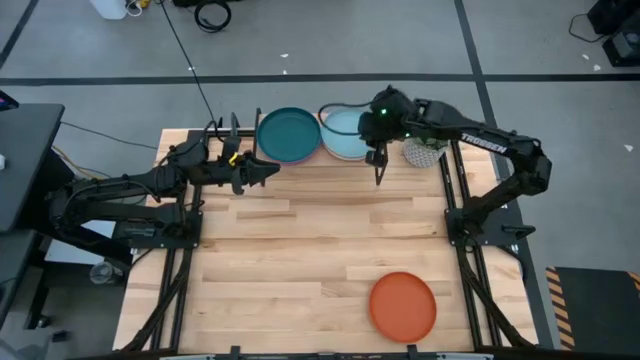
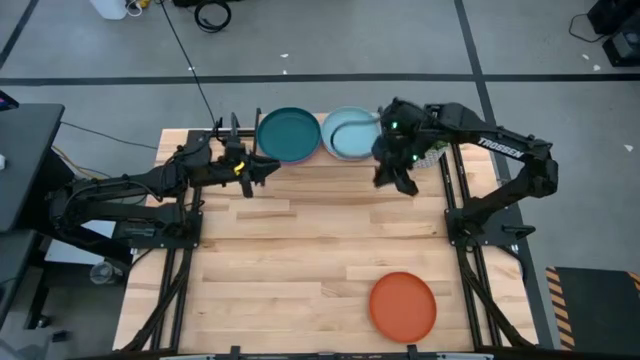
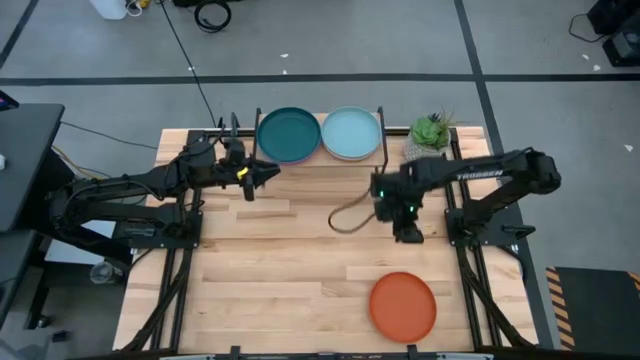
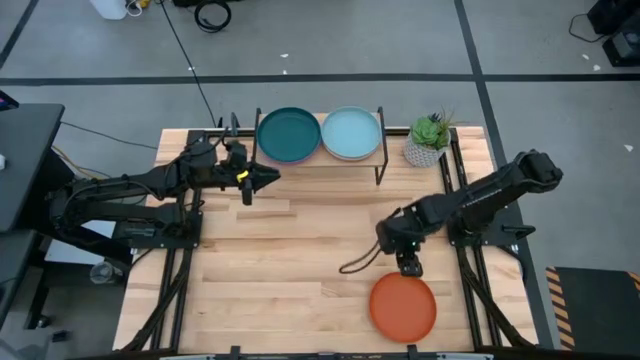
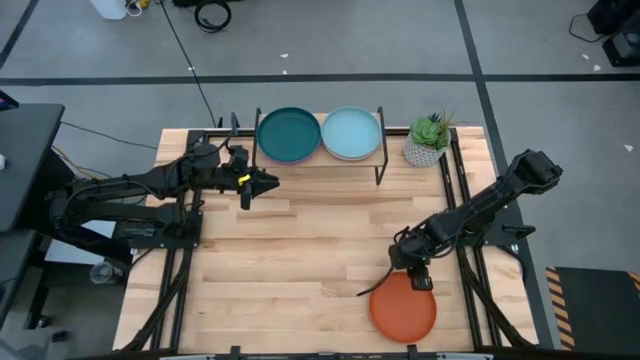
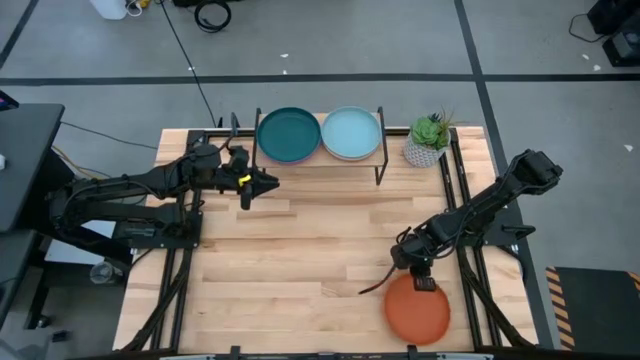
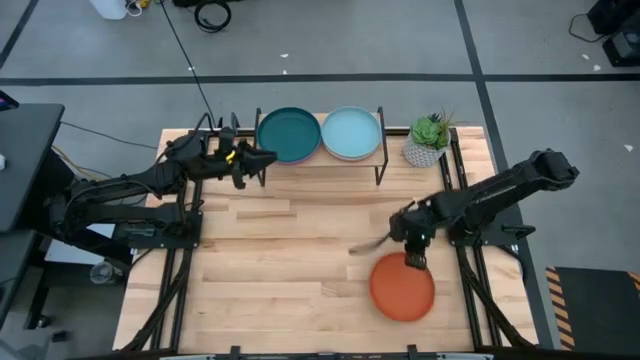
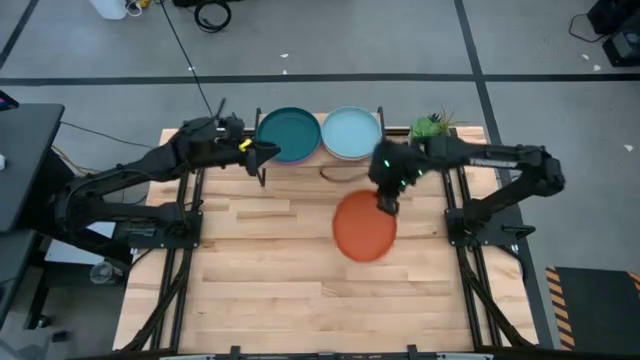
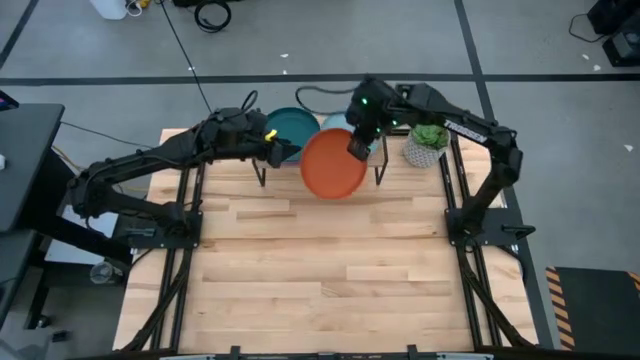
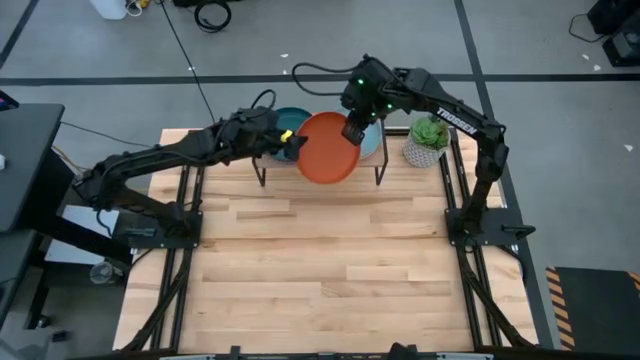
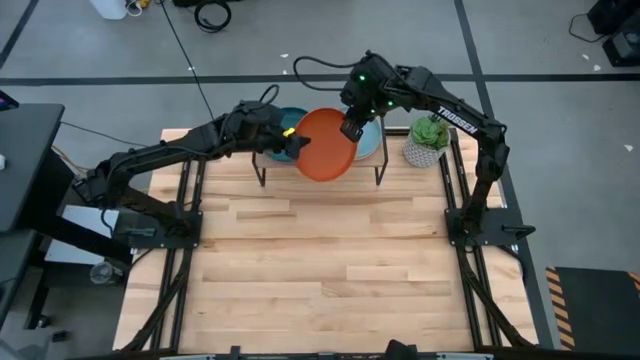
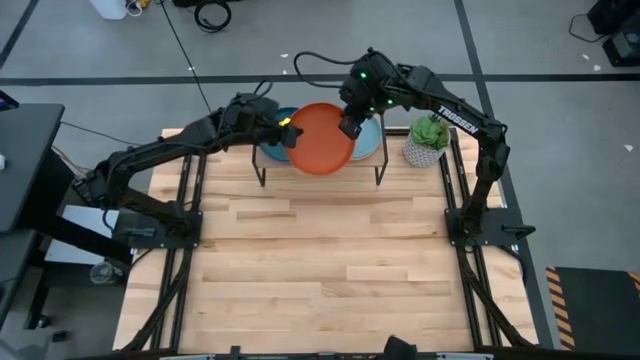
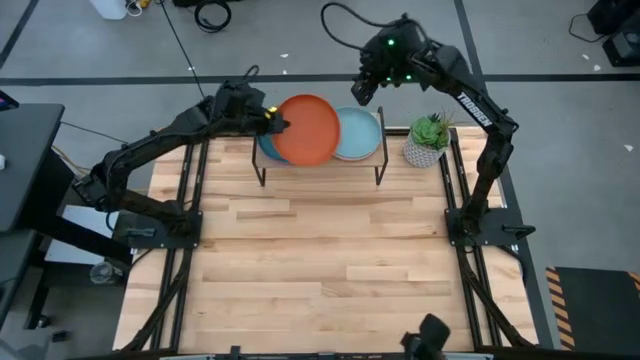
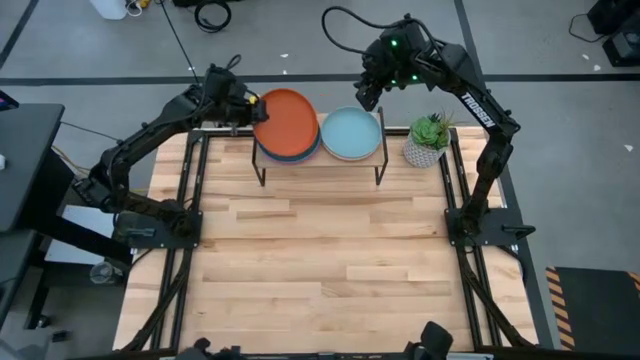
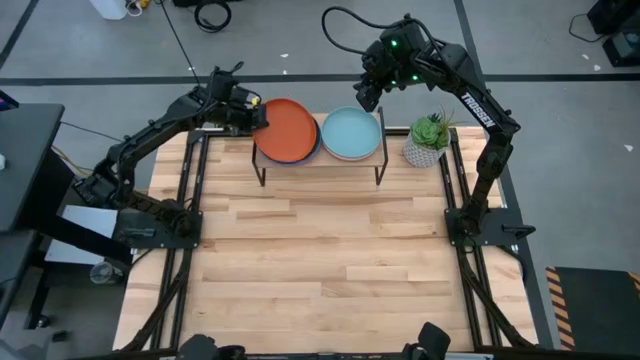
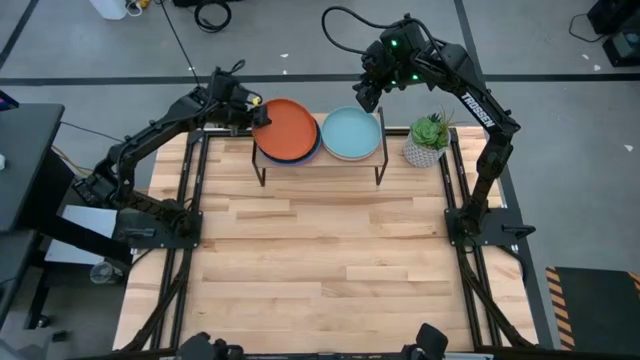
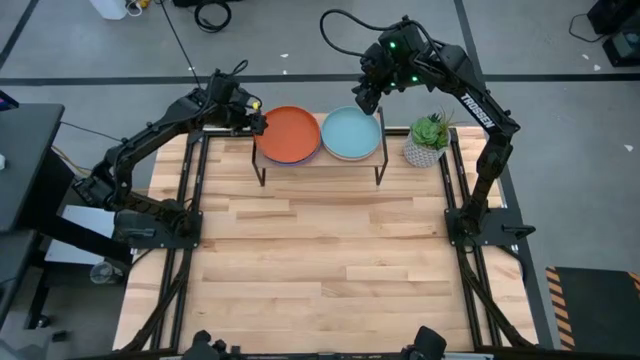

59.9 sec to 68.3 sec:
Task: Place and stack plates onto a shelf
Stack the orange plate on top of the dark blue plate on the shelf

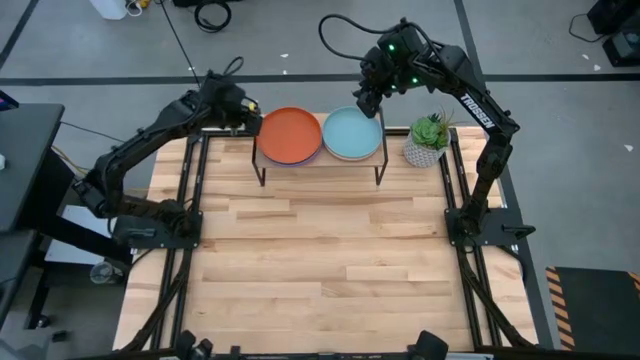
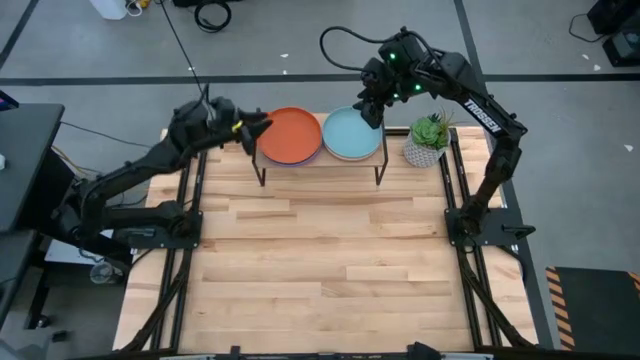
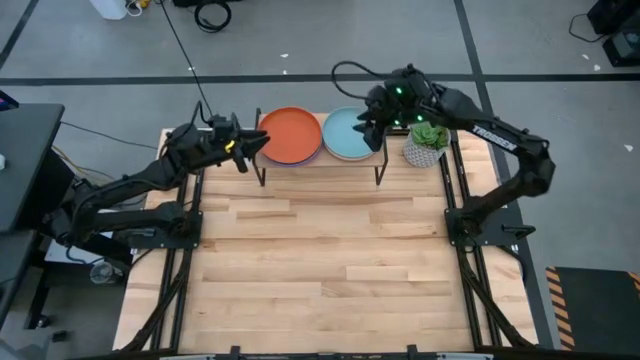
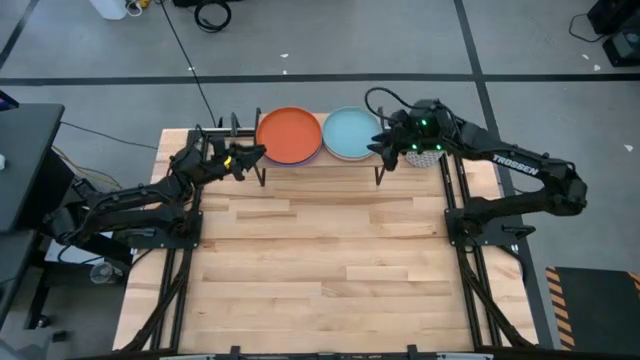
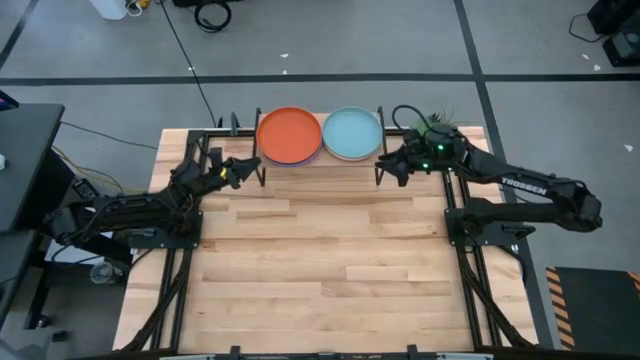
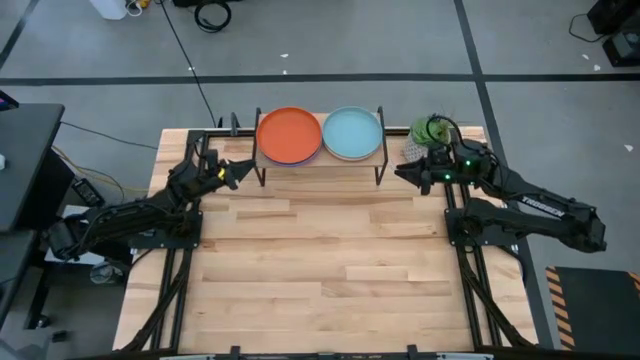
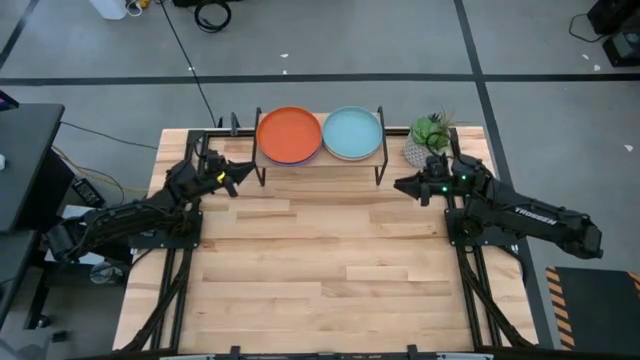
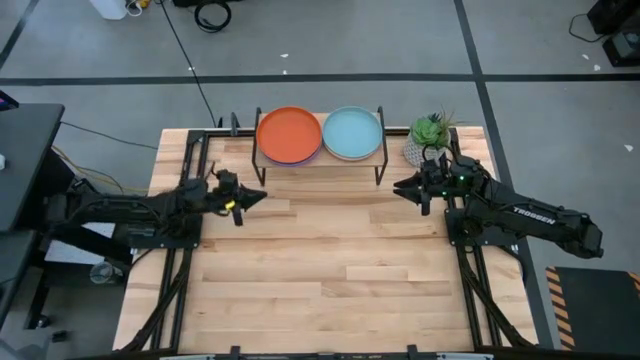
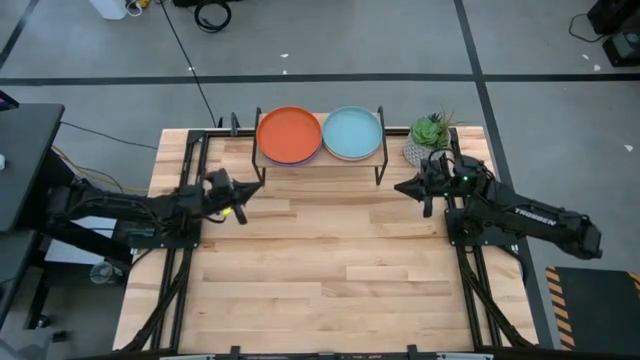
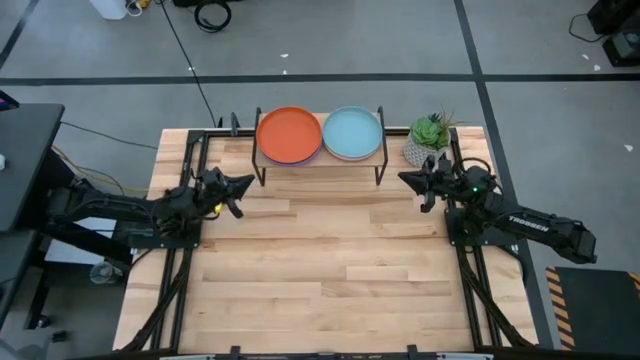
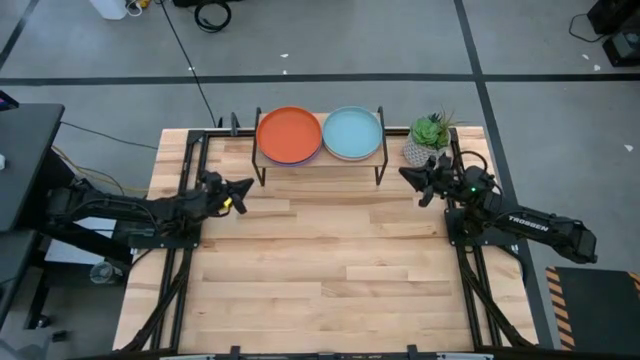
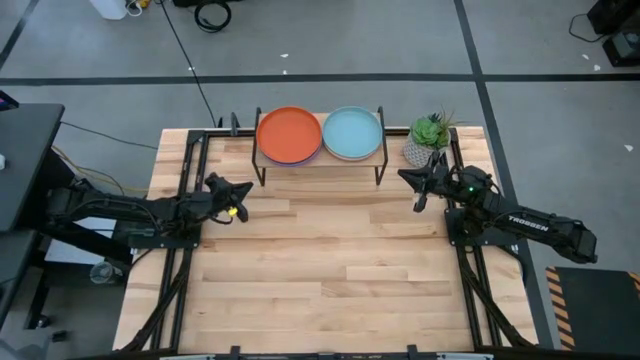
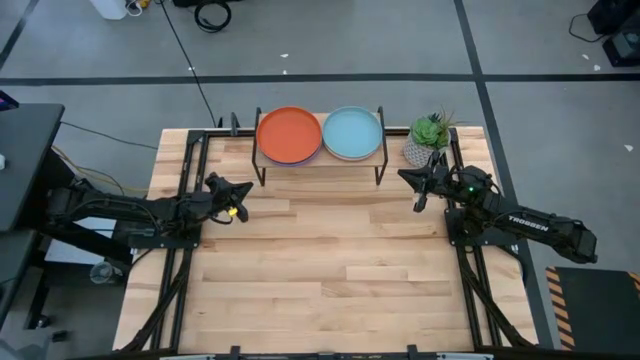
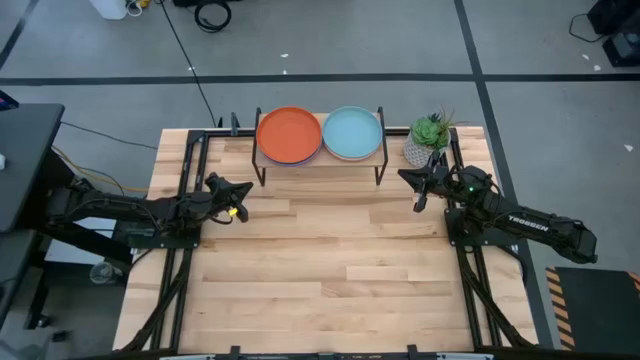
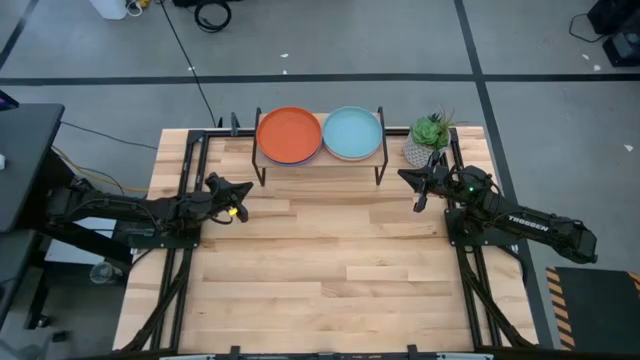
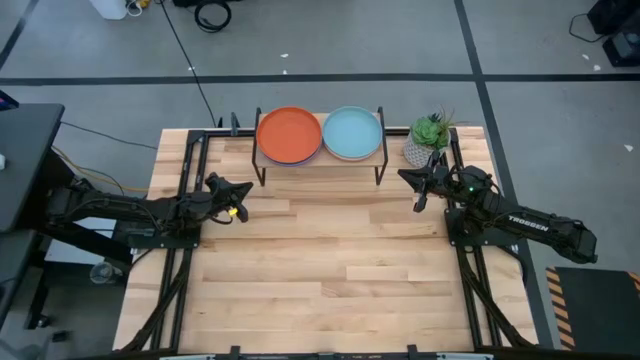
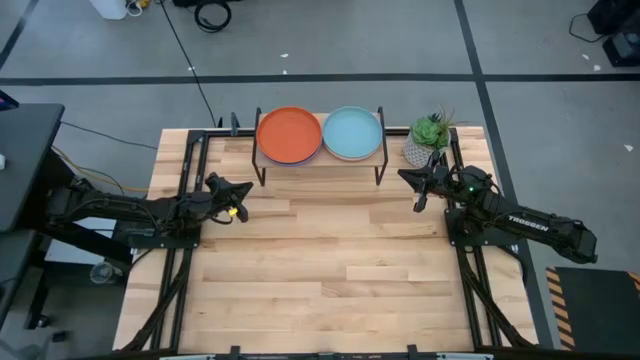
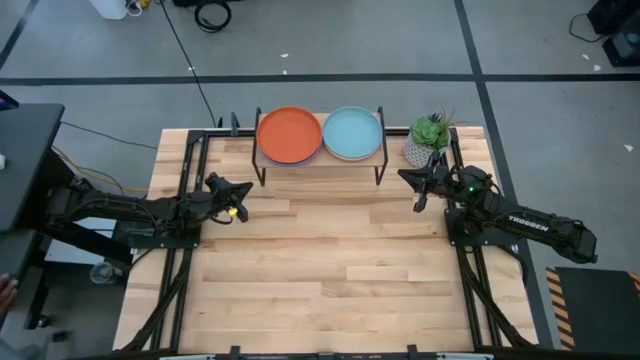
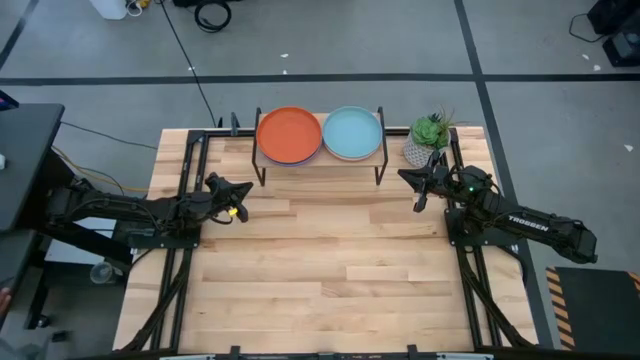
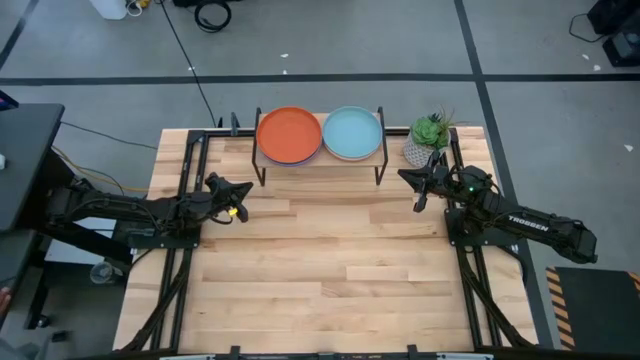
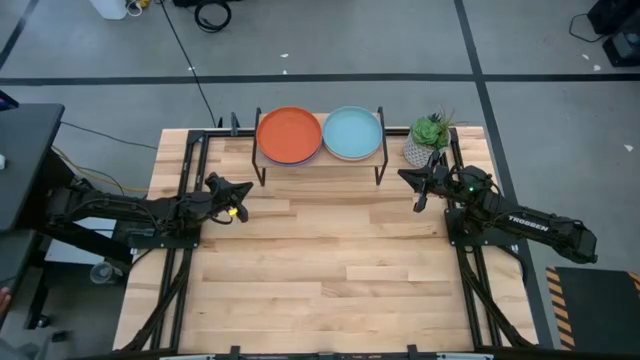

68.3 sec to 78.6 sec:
Return to Home Position

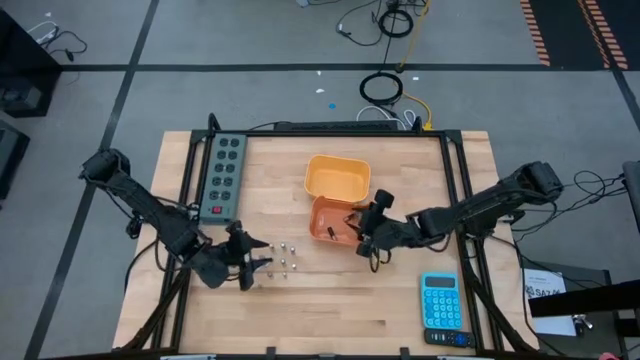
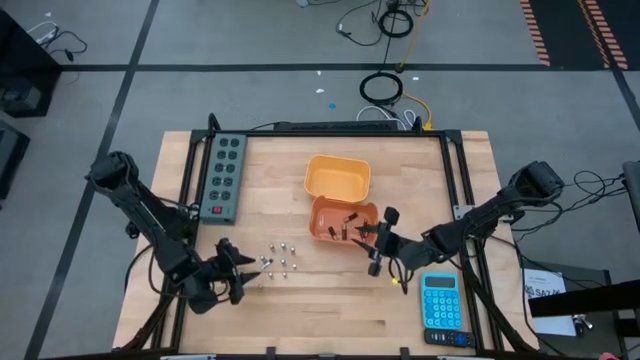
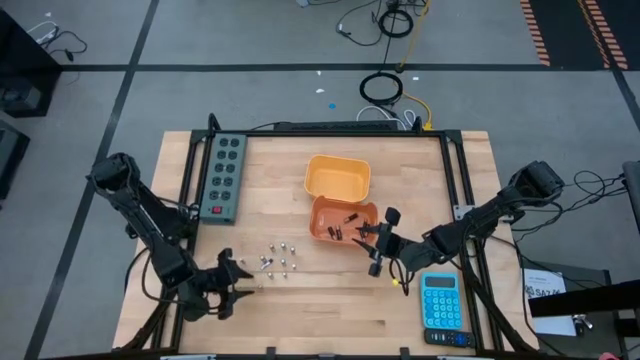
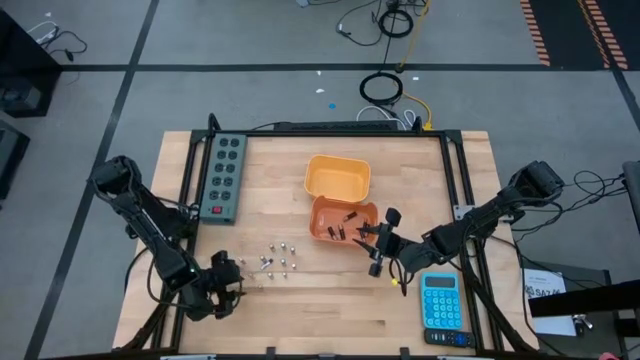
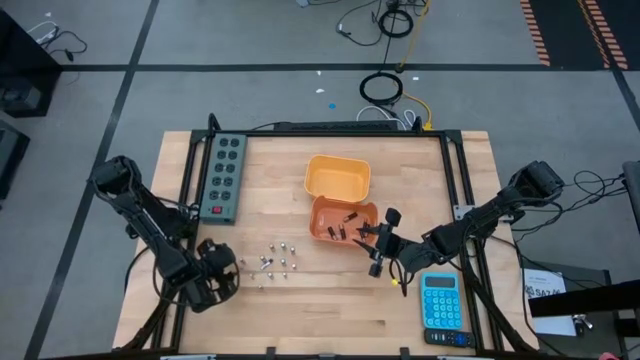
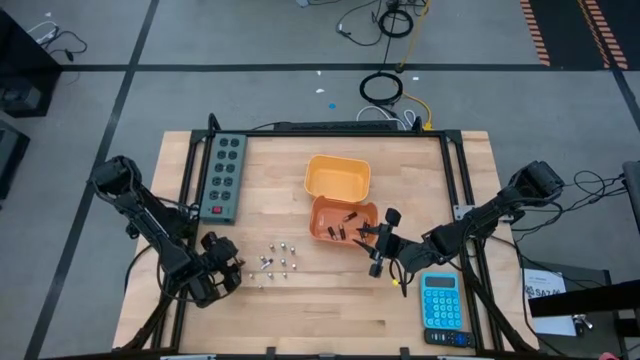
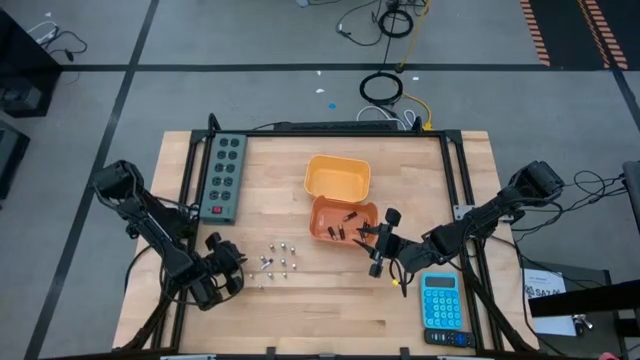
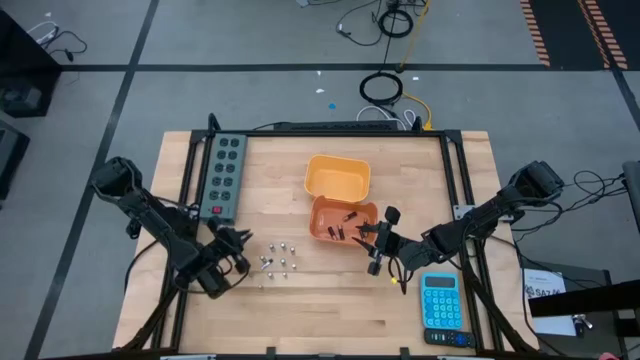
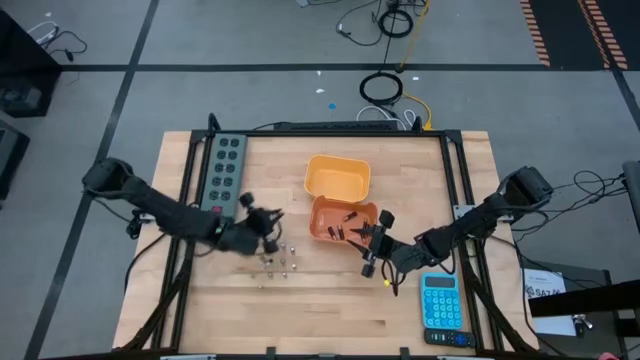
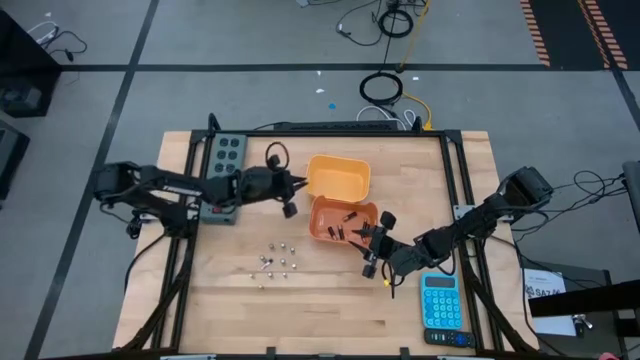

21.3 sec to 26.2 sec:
Task: Sort batteries
Put the silver battery into the yellow bin
